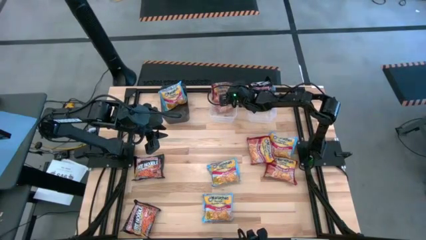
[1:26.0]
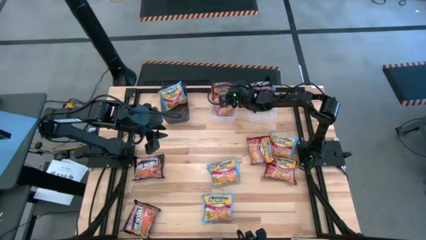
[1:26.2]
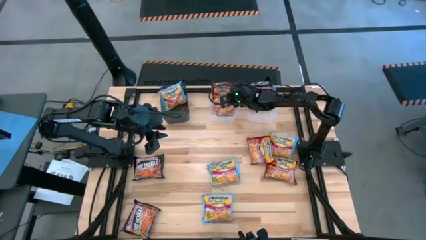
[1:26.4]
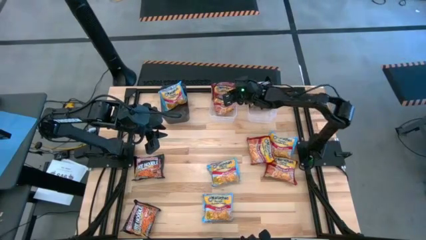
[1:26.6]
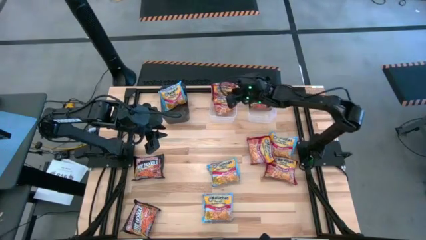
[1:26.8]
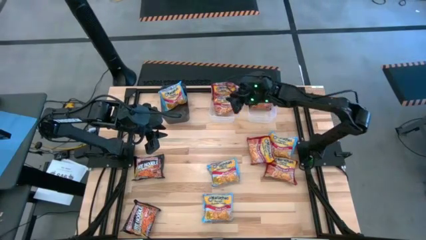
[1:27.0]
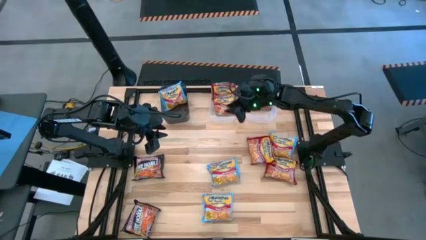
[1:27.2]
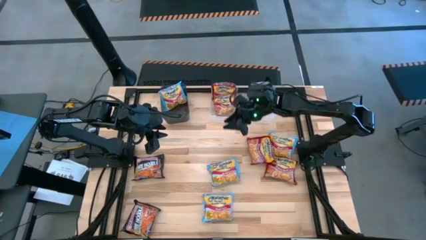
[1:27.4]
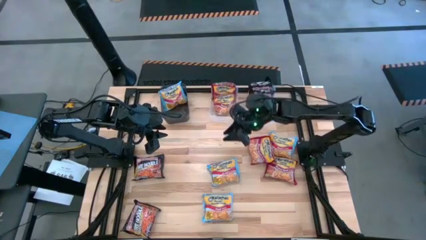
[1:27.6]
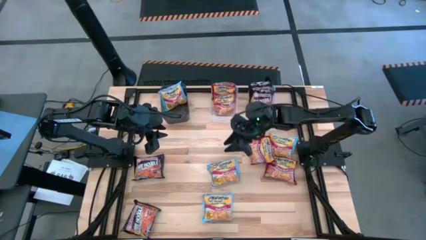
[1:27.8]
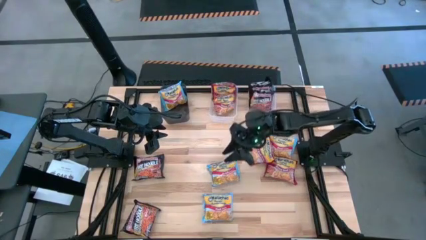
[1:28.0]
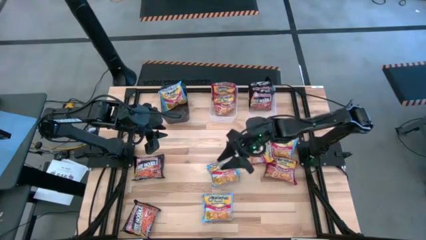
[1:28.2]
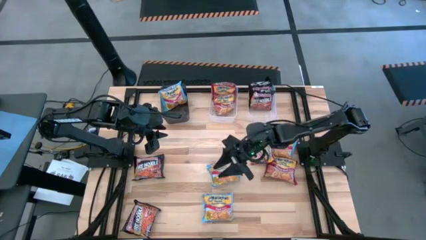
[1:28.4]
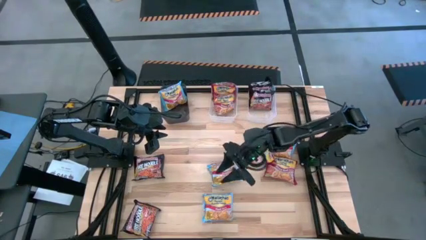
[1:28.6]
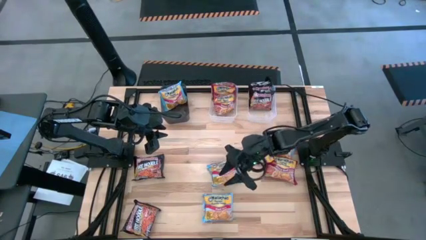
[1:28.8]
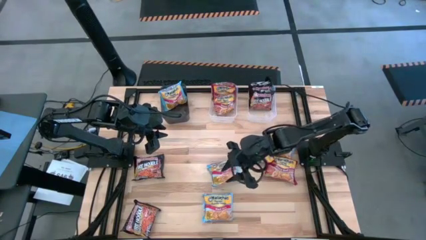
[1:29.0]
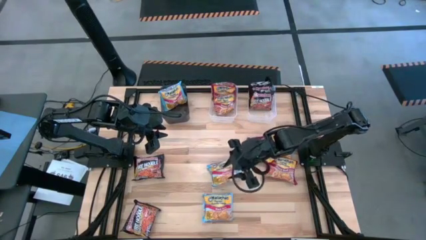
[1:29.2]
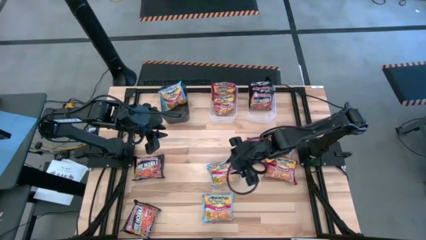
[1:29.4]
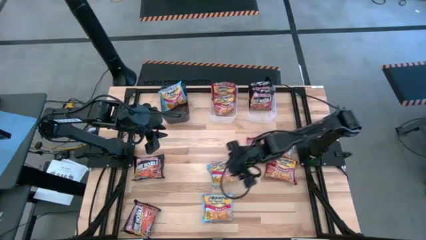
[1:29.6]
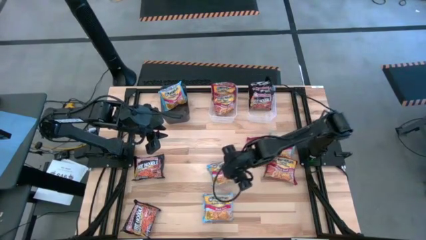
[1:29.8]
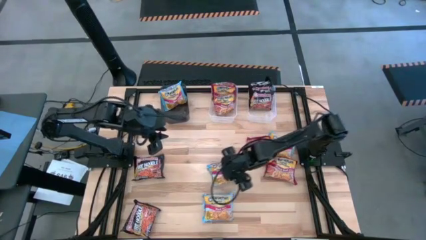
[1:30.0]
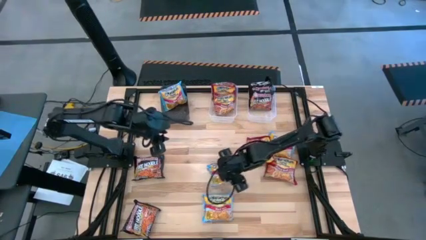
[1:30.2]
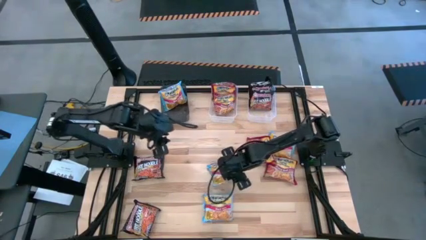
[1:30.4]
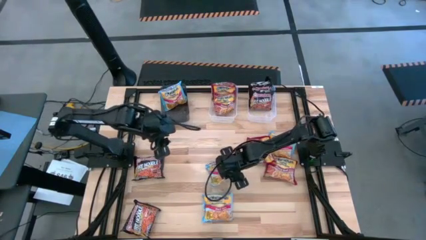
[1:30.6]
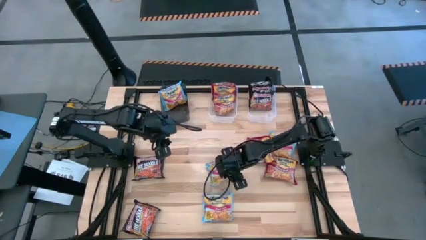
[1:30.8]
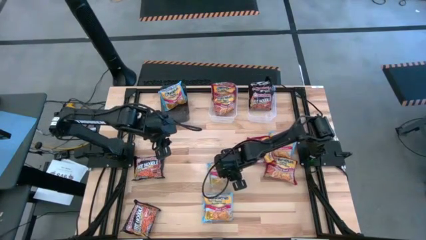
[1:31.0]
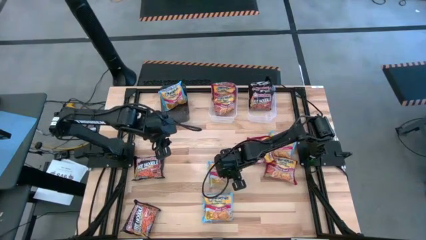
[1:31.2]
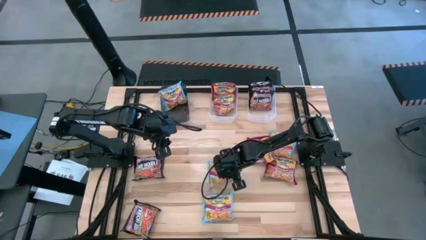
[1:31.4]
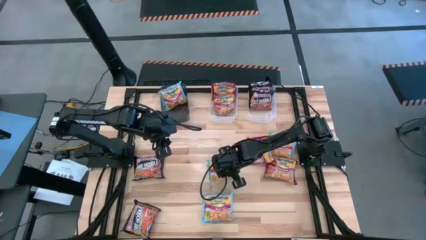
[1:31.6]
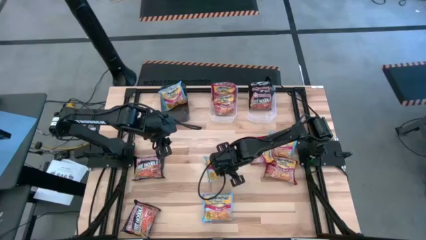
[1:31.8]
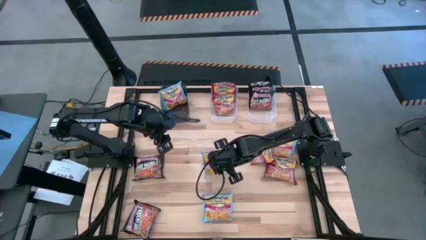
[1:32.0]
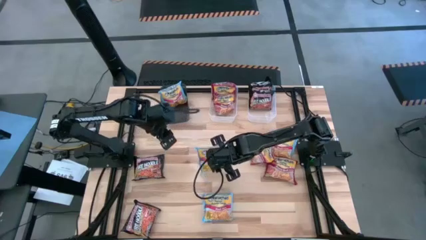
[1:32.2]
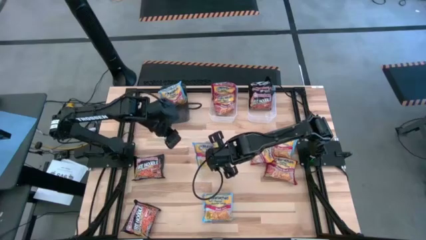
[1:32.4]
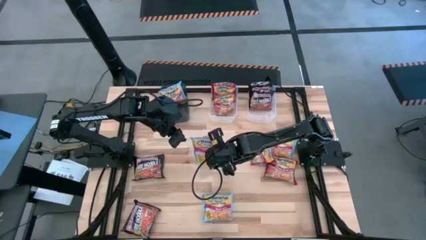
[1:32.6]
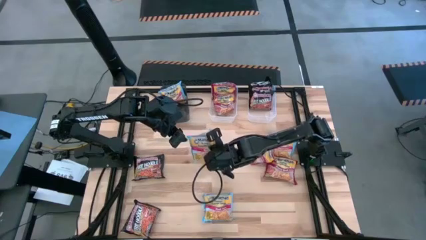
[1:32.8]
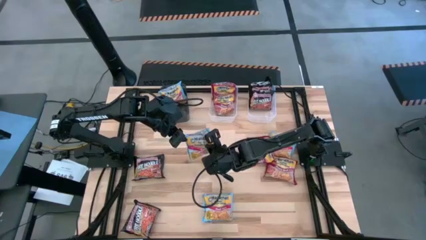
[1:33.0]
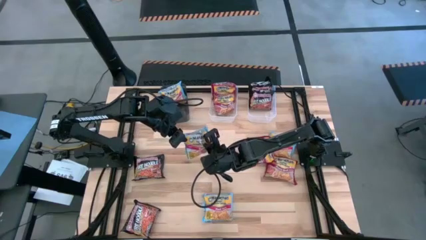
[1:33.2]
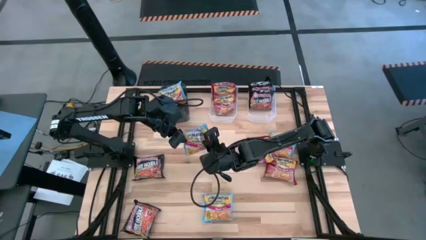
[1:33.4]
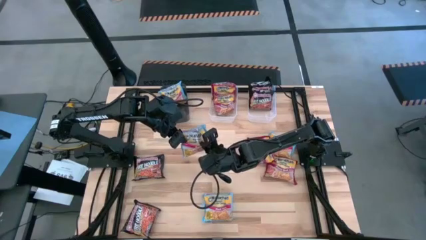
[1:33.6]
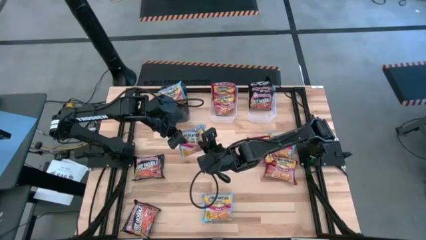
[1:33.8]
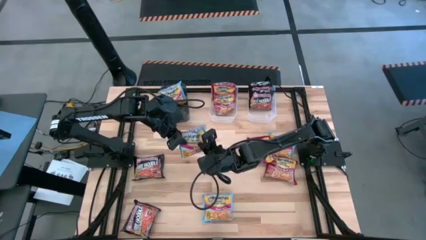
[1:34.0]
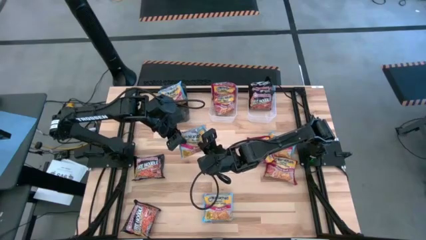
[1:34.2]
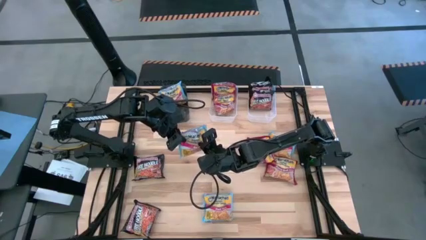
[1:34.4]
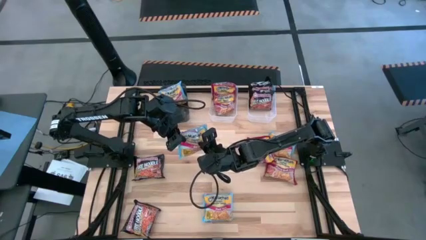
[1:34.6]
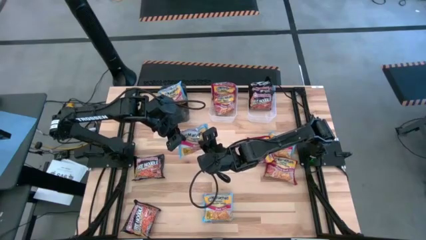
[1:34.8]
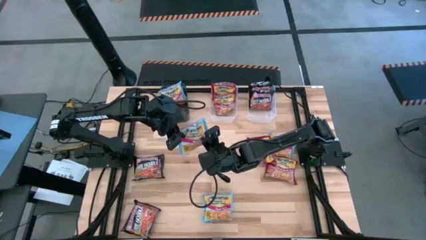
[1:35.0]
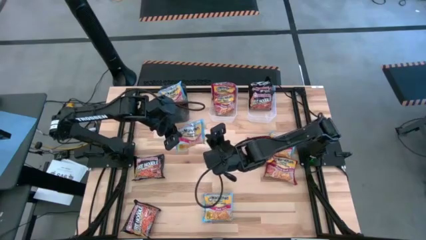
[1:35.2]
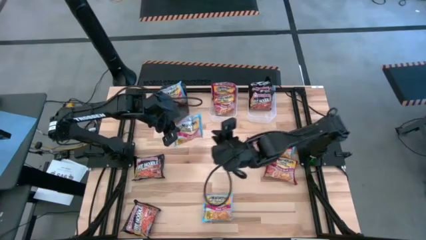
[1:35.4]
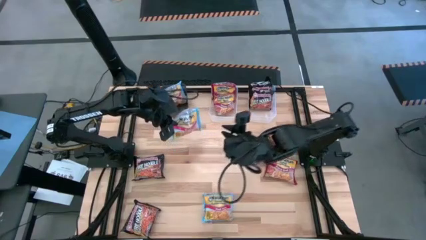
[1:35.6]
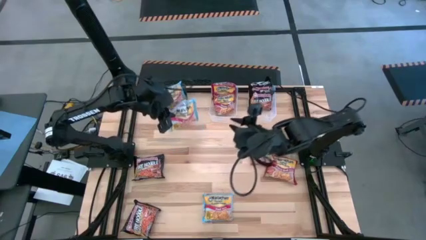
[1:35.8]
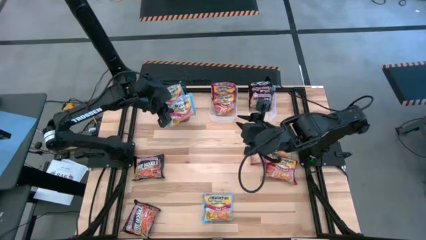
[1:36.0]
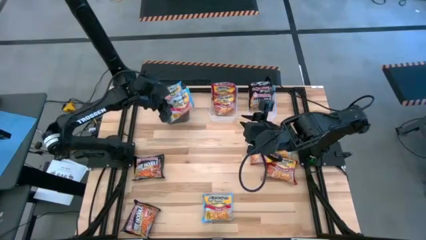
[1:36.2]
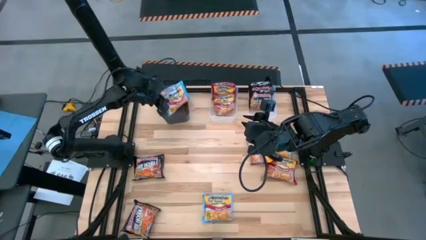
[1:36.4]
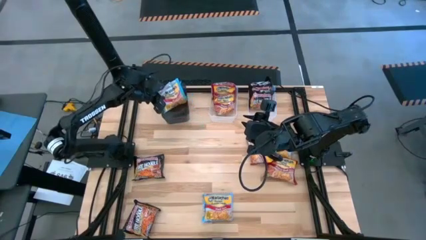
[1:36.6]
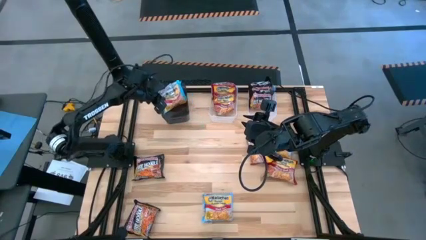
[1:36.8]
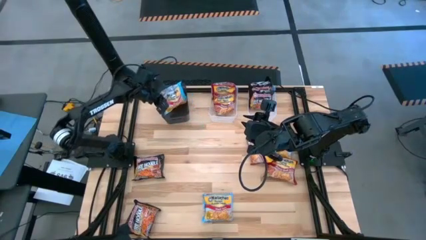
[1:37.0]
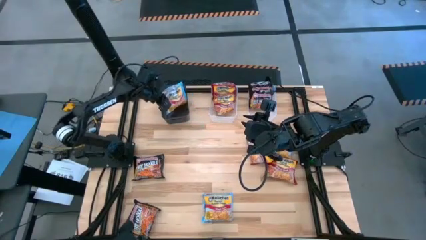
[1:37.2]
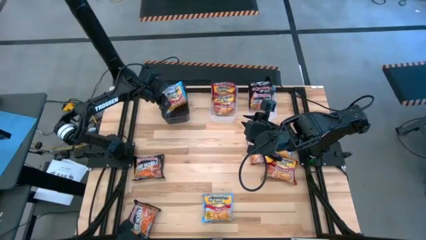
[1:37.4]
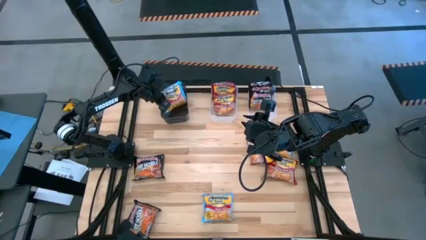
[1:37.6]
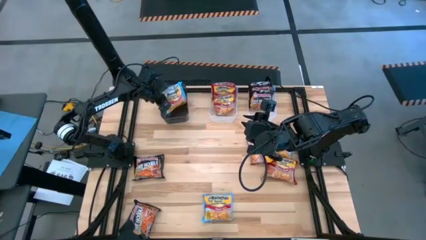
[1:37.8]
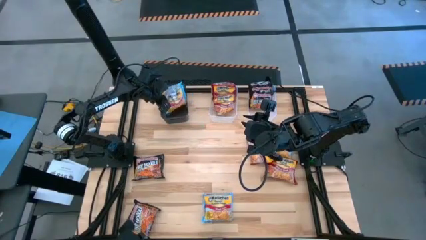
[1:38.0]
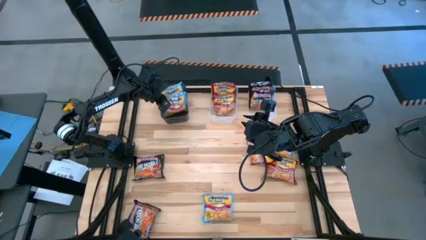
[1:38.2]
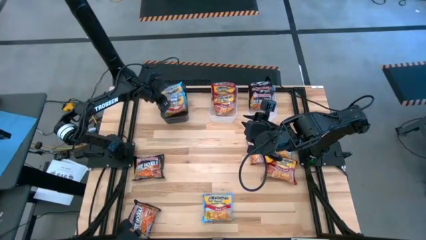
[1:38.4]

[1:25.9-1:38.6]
Task: Sort Maruchan noodles
Put the blue noodle pack into the black bin

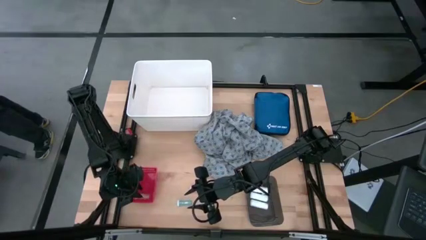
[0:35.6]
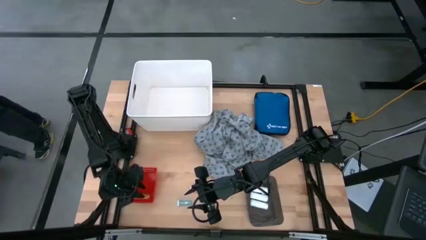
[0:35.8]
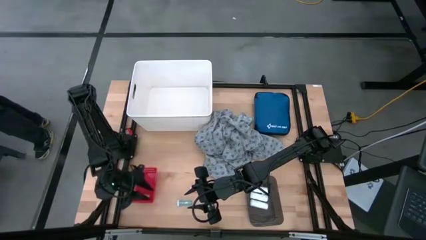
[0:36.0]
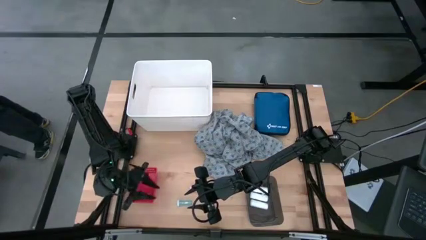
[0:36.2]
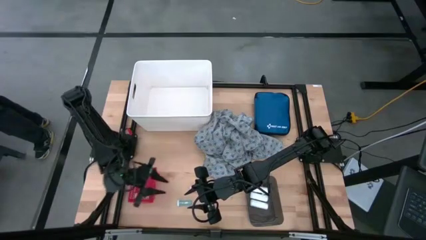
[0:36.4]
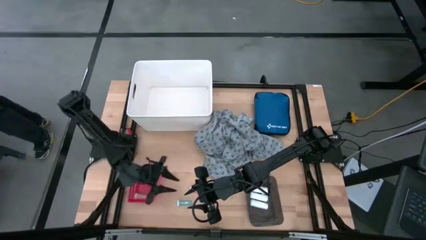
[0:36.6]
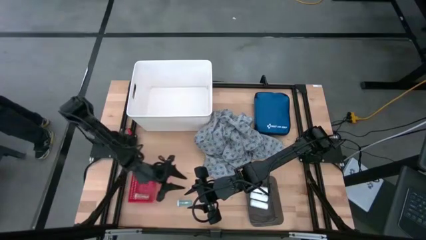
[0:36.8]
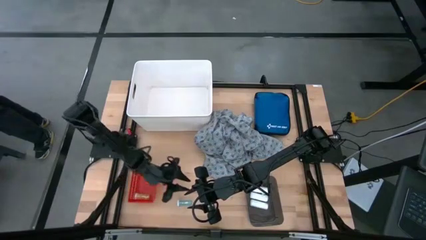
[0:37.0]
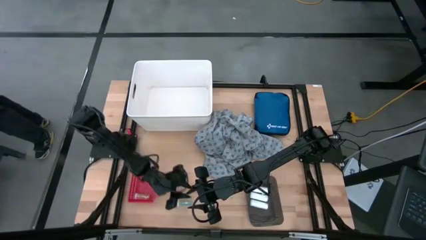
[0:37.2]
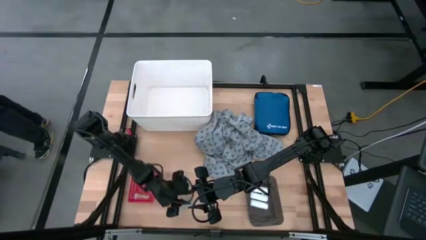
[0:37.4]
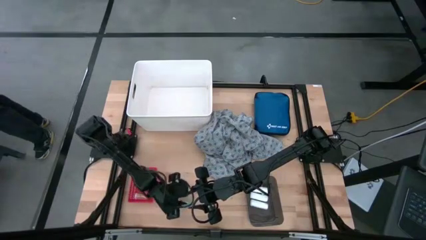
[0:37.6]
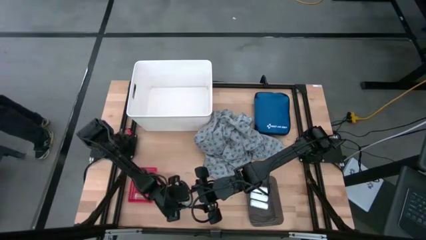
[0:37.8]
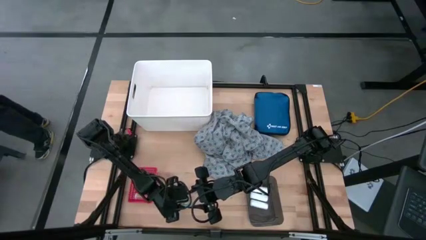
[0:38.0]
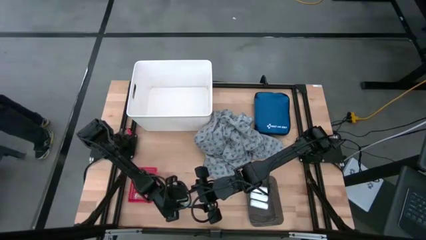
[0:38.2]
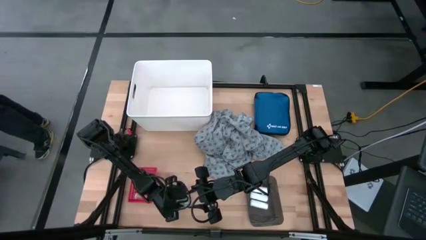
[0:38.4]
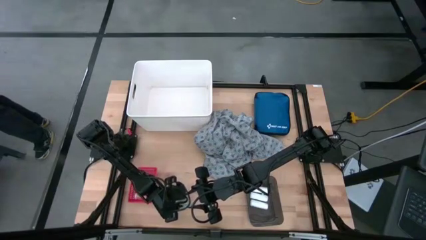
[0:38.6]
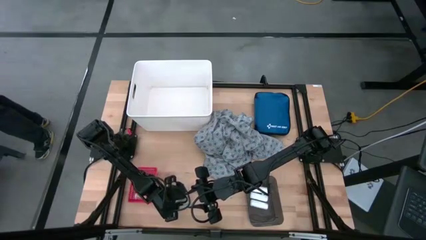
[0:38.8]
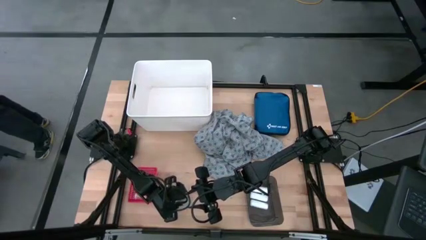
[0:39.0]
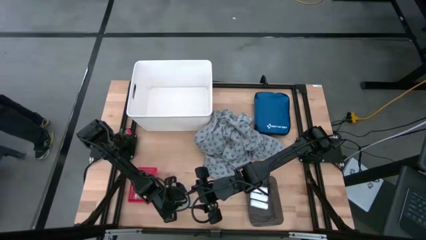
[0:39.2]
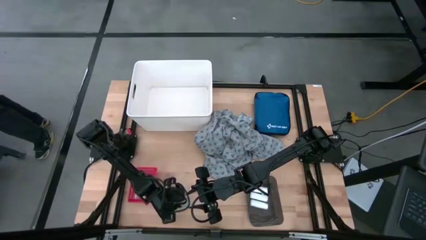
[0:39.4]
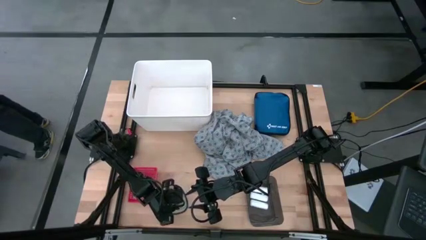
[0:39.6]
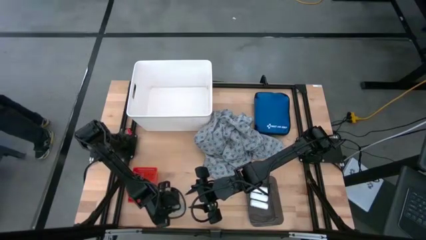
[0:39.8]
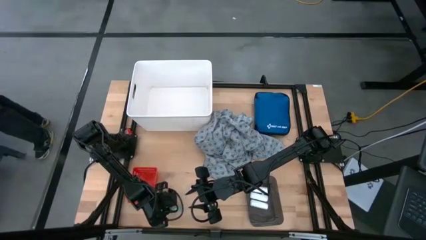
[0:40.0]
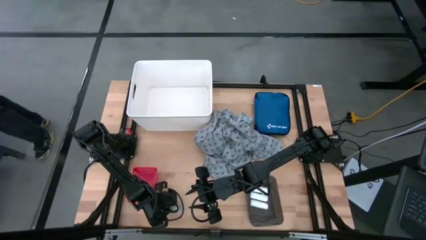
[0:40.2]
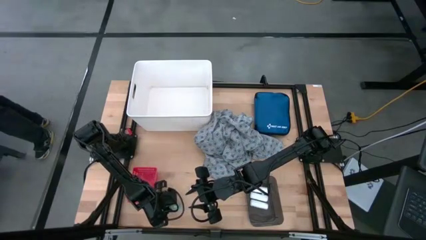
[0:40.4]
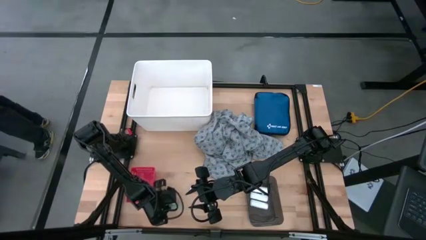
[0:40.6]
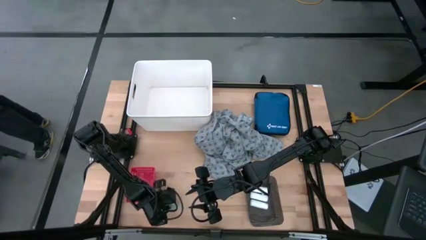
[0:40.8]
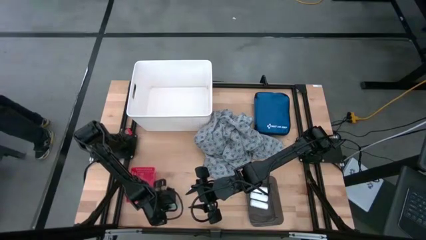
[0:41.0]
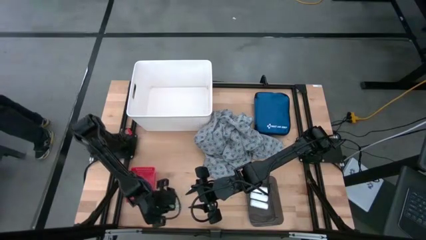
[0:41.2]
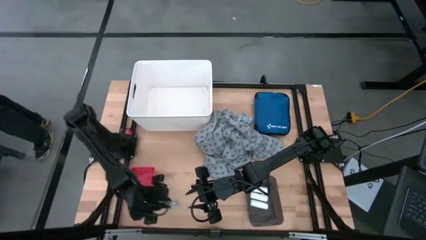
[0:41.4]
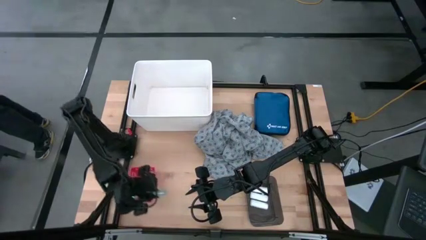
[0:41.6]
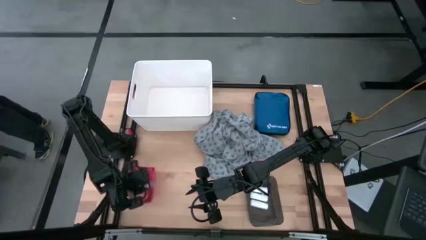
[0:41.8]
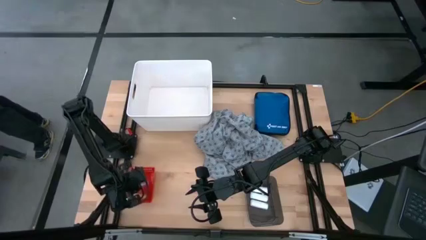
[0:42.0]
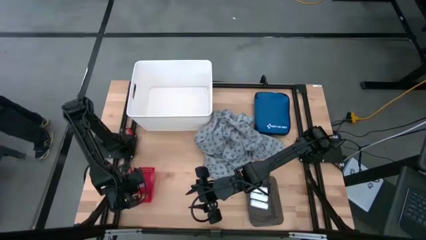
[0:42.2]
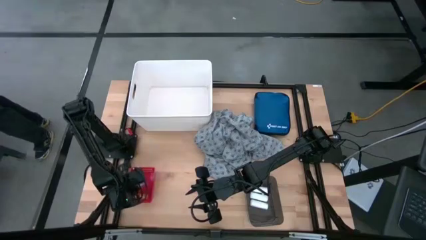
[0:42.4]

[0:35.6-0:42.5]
Task: Pick & Place Medicine items
Put the blue pill bottle into the red bin
